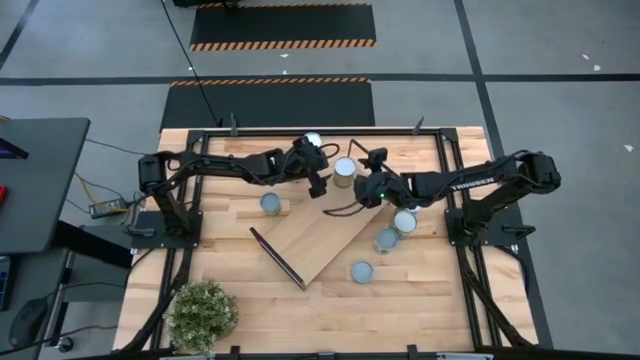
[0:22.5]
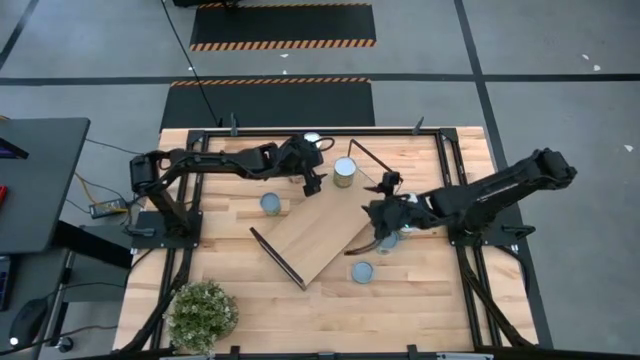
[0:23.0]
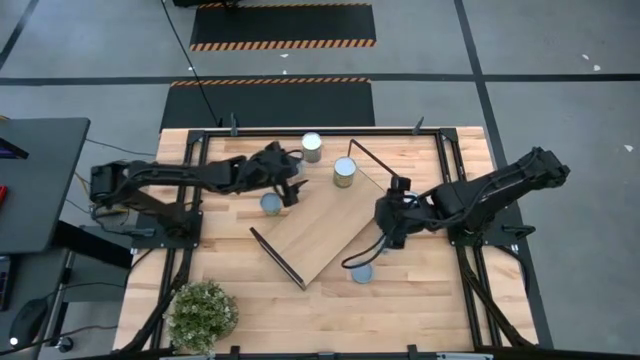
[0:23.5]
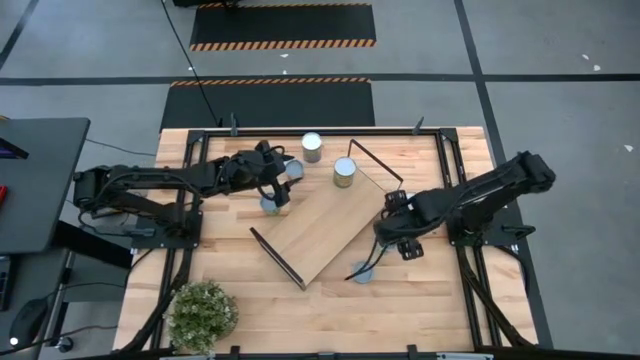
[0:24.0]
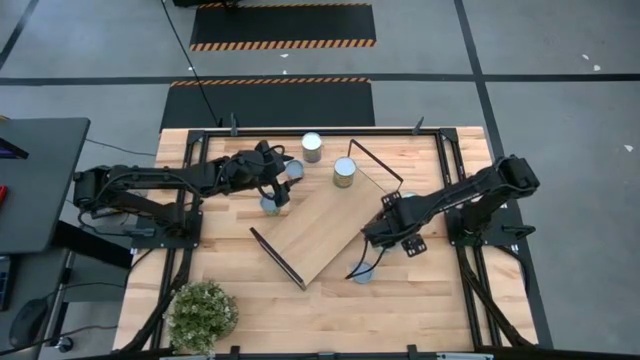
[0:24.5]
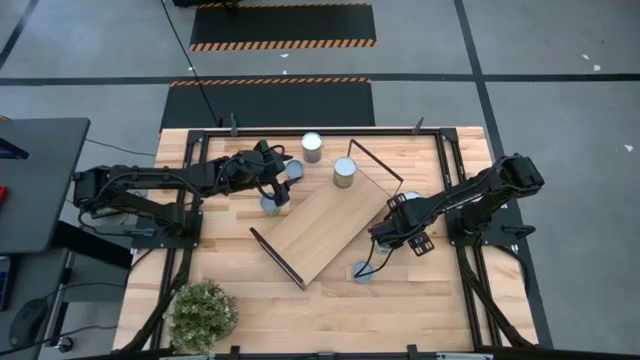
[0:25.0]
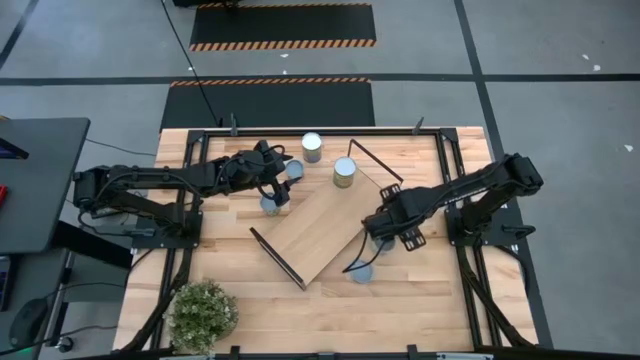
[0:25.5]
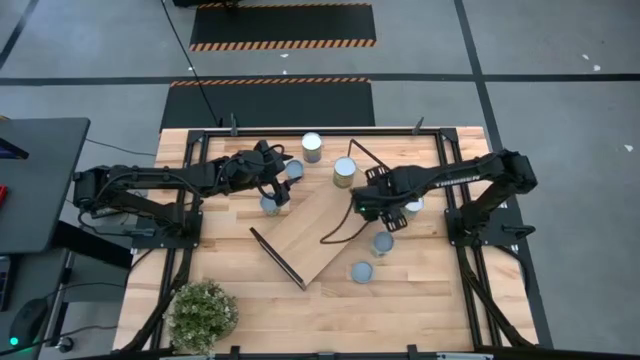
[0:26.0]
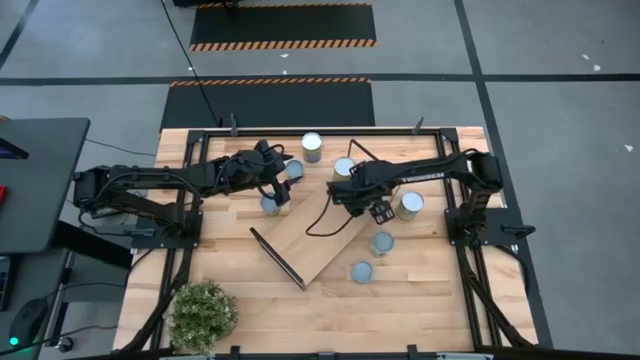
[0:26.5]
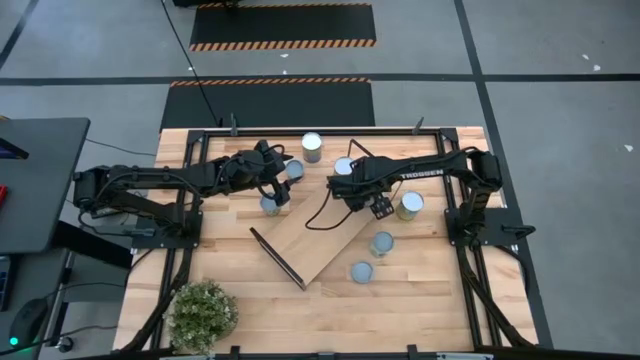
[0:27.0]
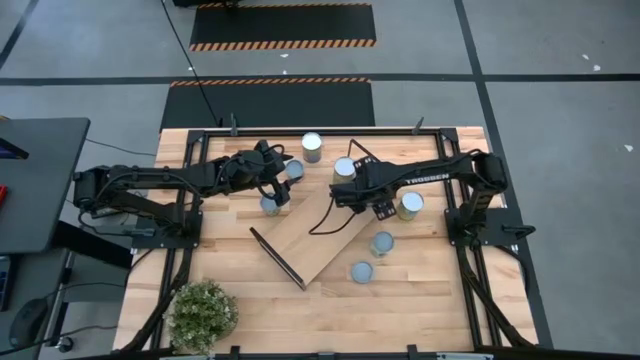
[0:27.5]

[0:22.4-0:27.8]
Task: Pick and place cans onto a shelf
Put the right dark blue fruit can on the shelf aligned with the green fruit can

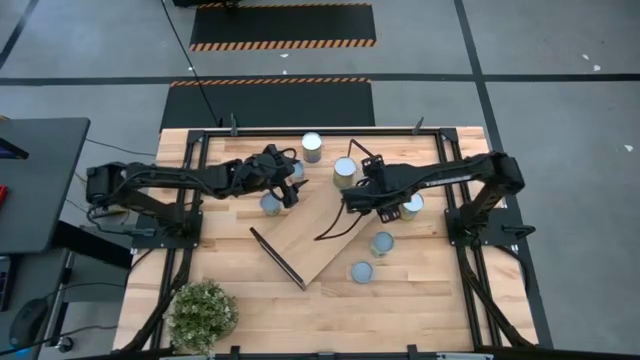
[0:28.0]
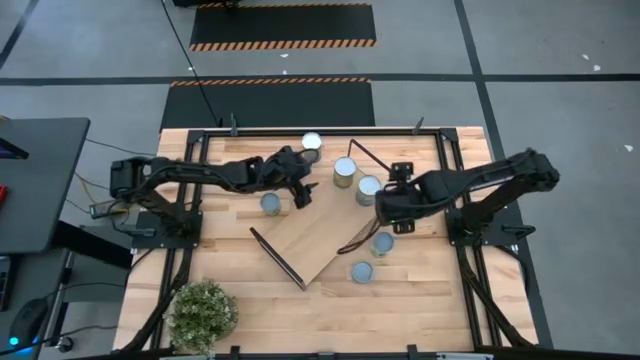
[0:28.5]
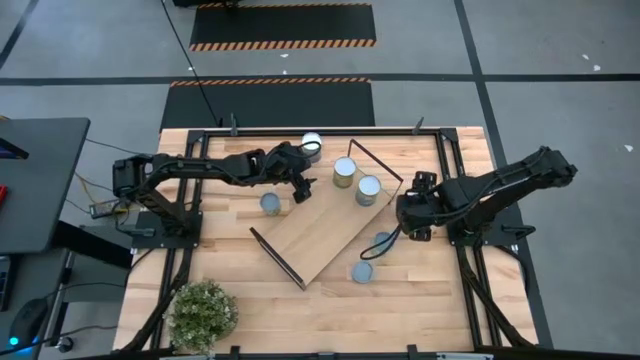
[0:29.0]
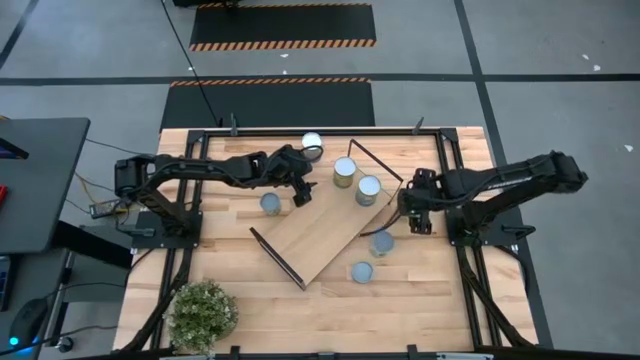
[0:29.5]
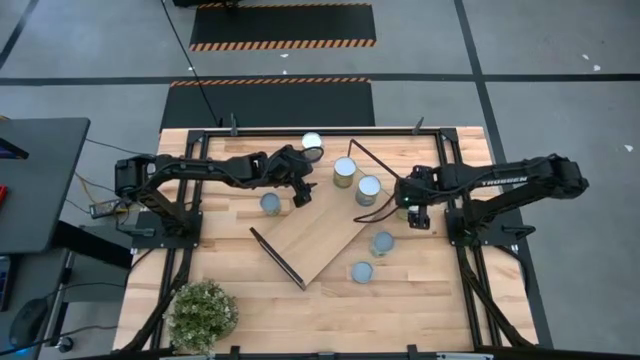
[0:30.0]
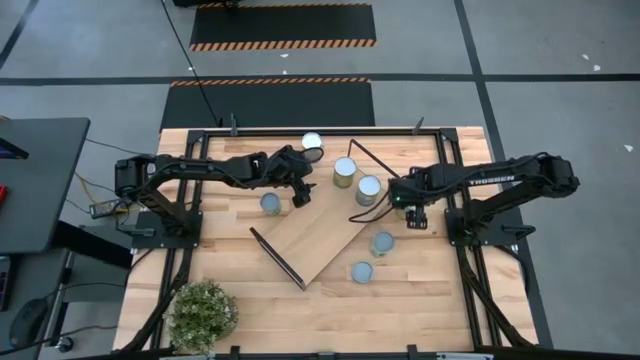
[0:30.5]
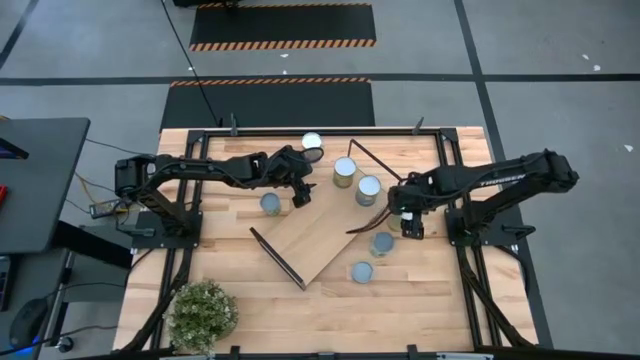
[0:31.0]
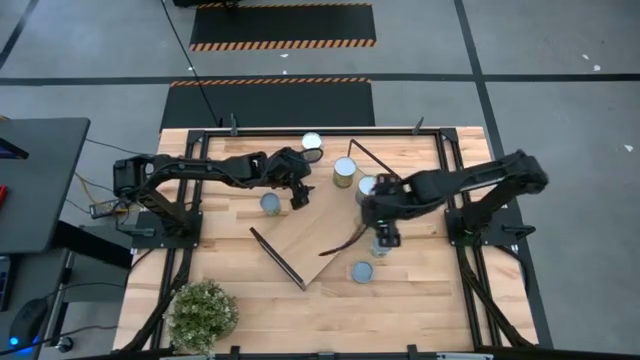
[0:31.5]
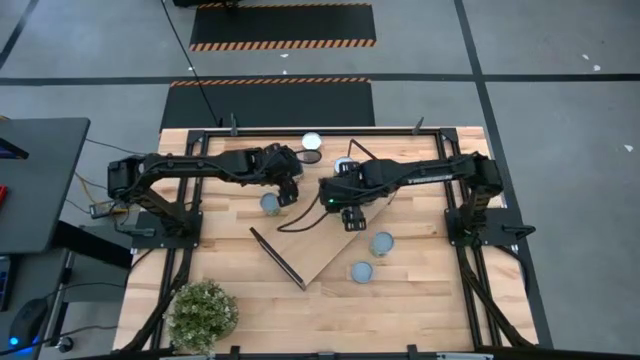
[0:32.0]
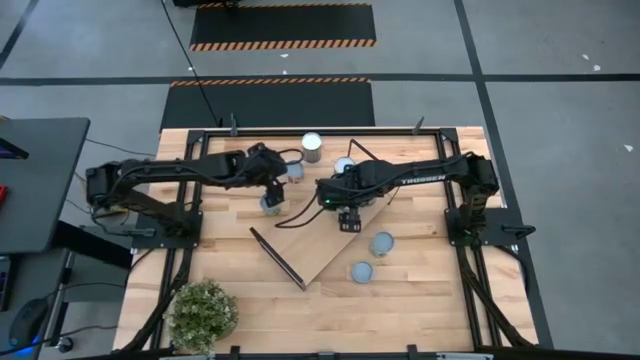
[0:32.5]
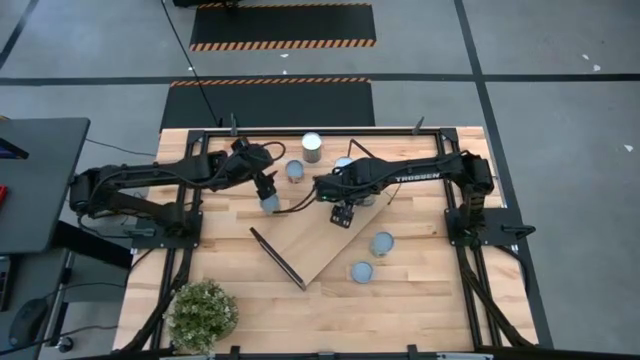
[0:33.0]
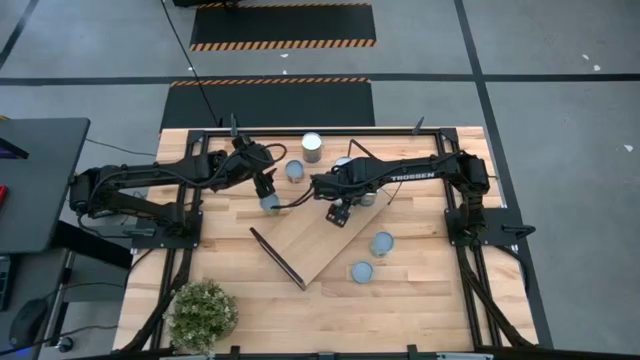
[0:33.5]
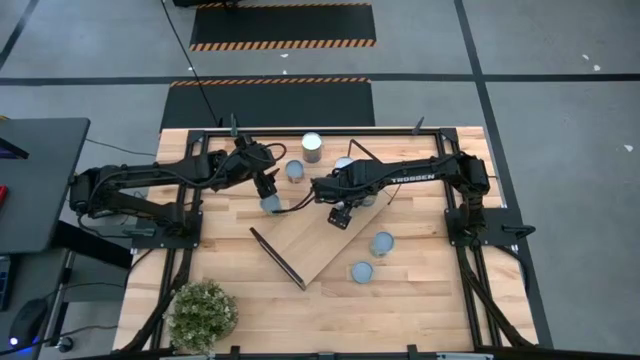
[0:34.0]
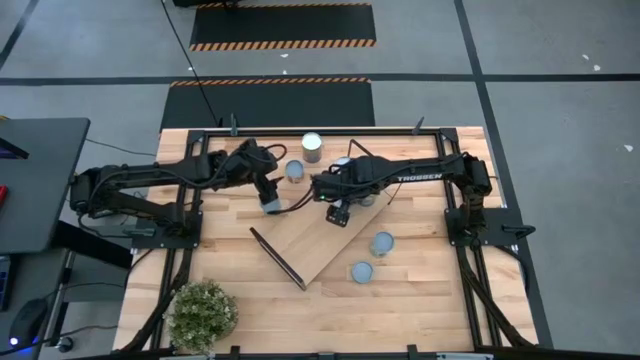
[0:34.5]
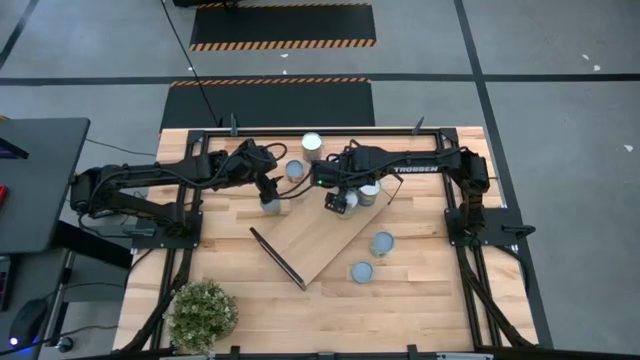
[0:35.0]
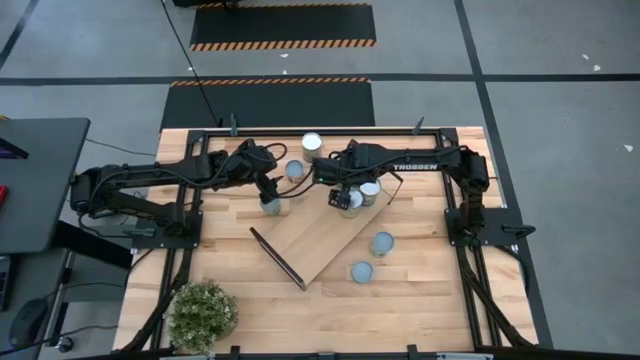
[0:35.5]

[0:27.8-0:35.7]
Put the yellow fruit can on the shelf

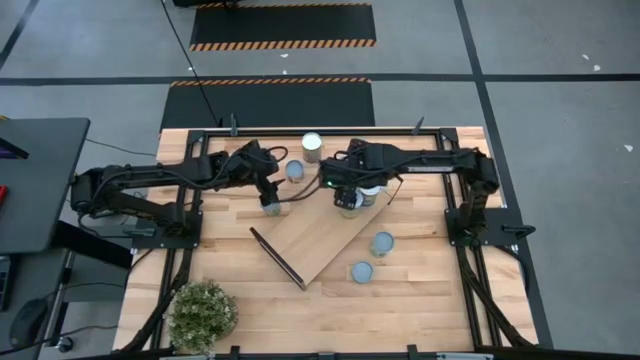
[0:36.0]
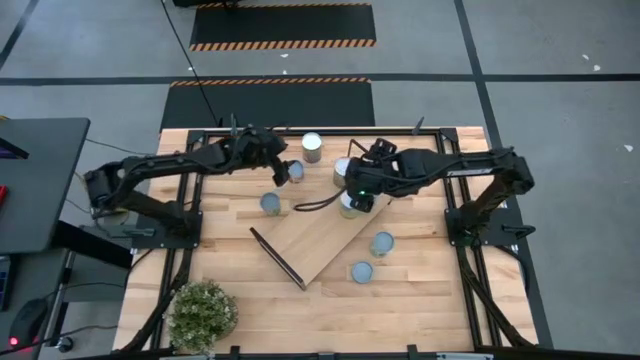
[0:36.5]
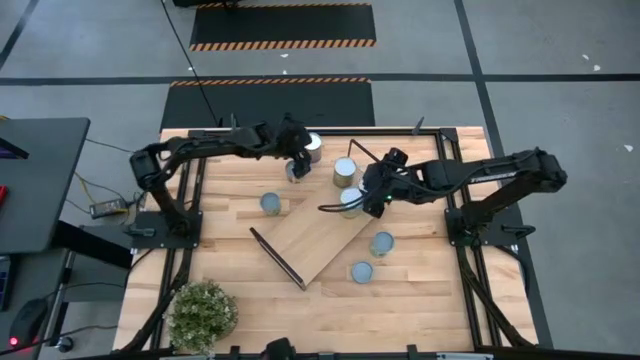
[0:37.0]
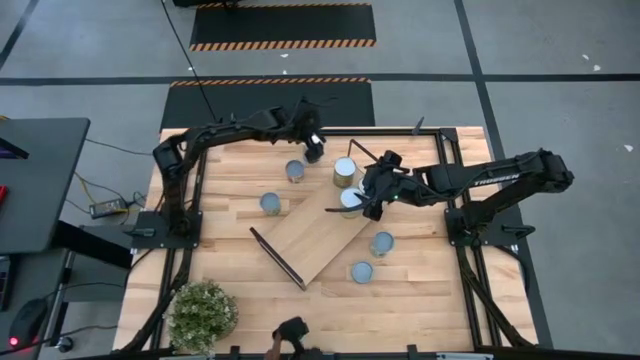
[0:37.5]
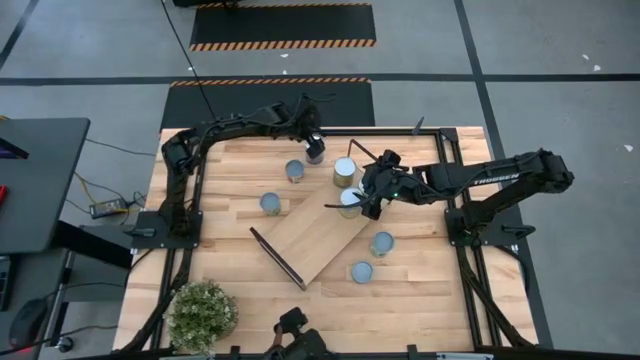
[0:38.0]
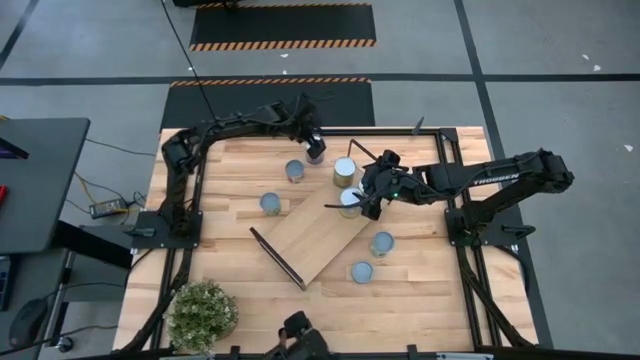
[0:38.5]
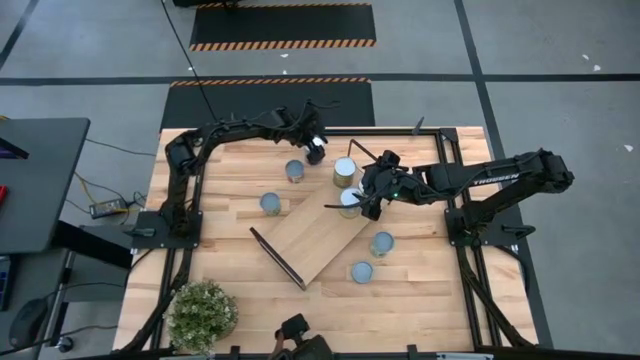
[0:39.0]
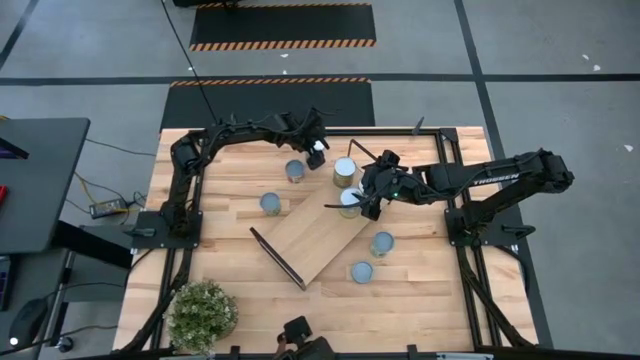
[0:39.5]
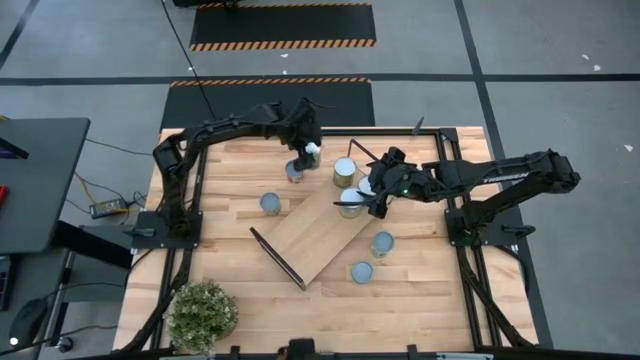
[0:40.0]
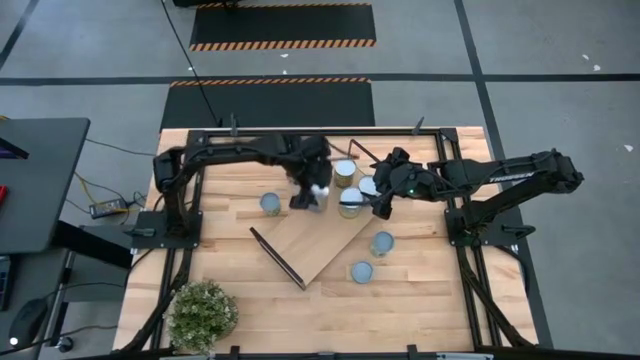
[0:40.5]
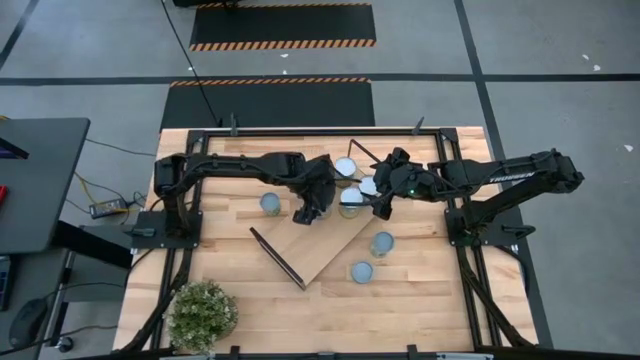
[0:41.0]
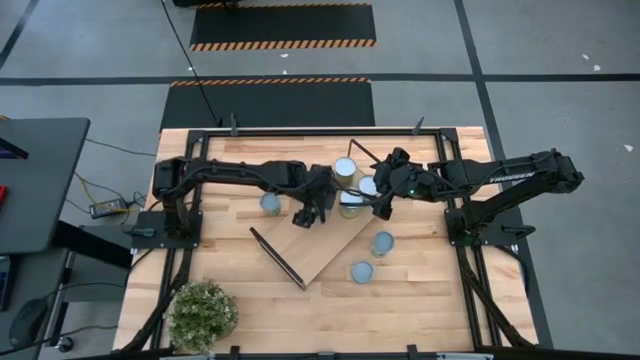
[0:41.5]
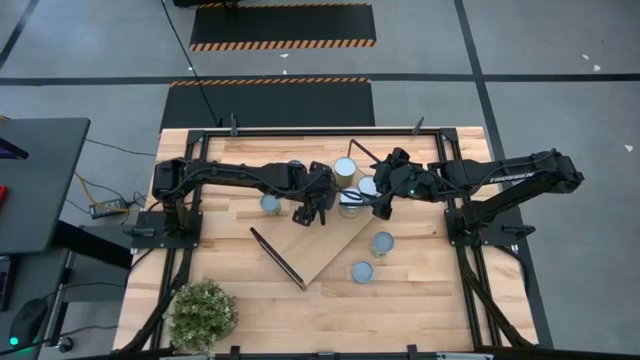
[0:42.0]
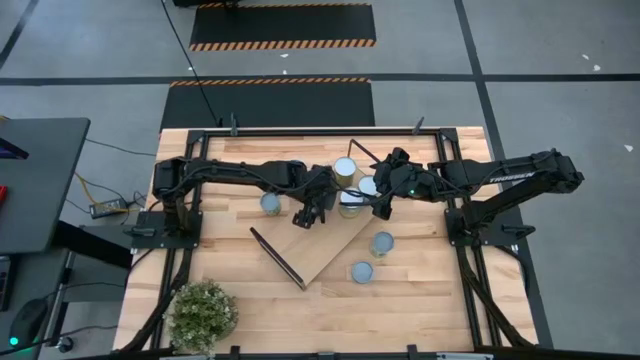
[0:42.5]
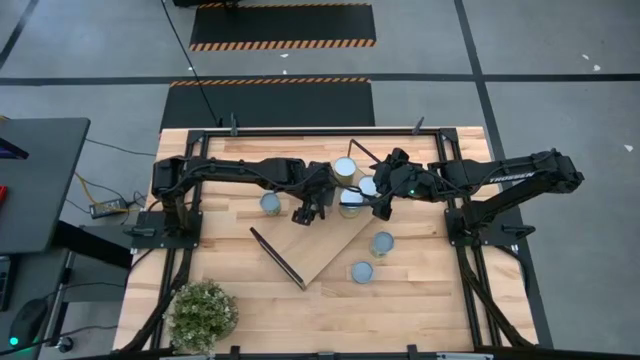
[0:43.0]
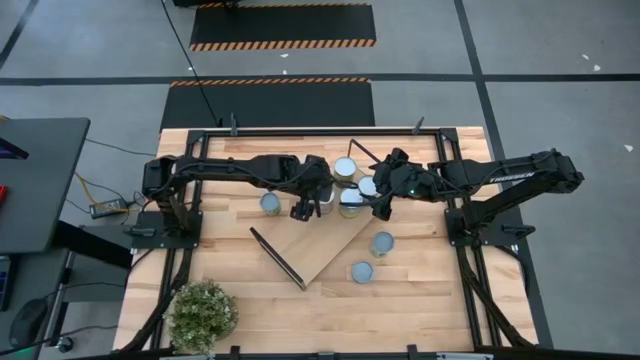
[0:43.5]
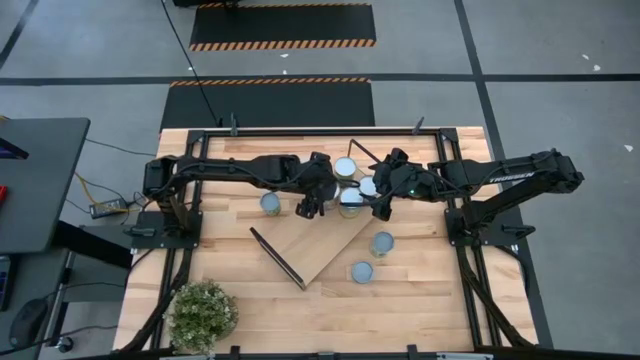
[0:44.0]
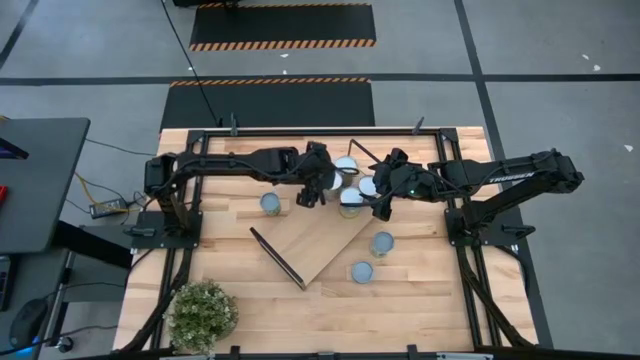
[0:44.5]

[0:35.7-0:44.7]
Put the dark blue fruit can on the shelf aligned with the yellow fruit can
